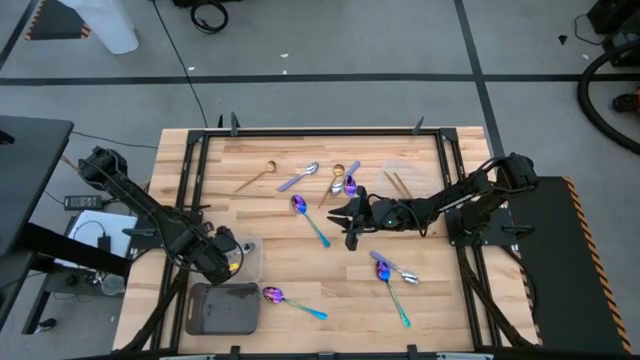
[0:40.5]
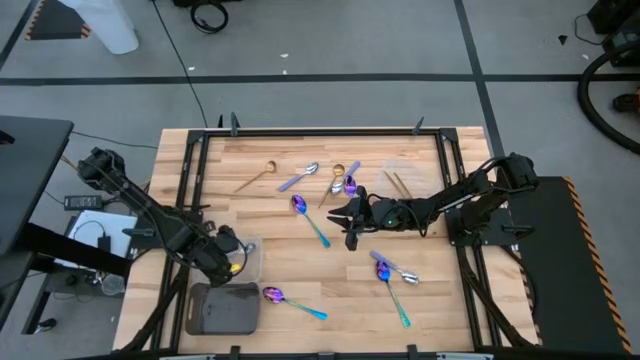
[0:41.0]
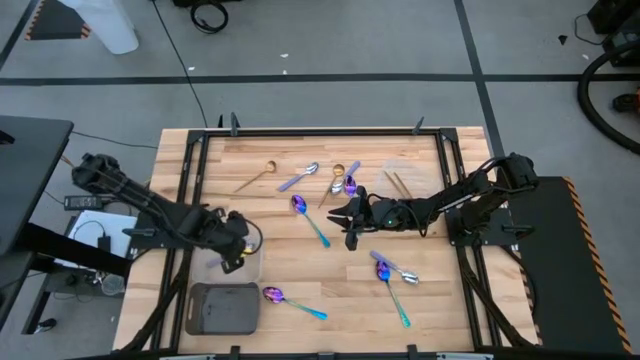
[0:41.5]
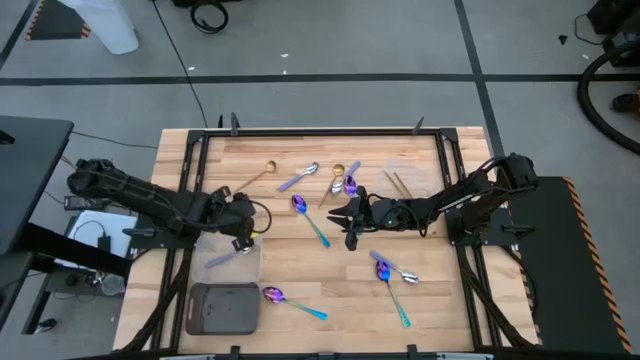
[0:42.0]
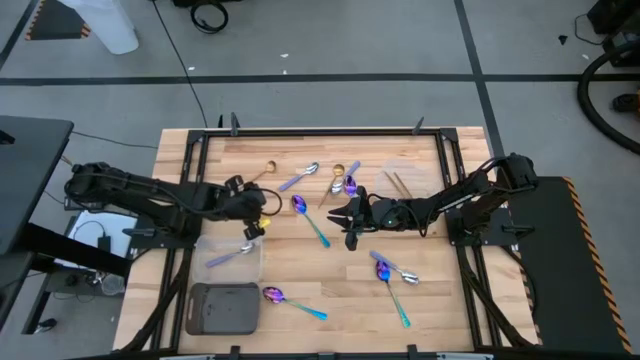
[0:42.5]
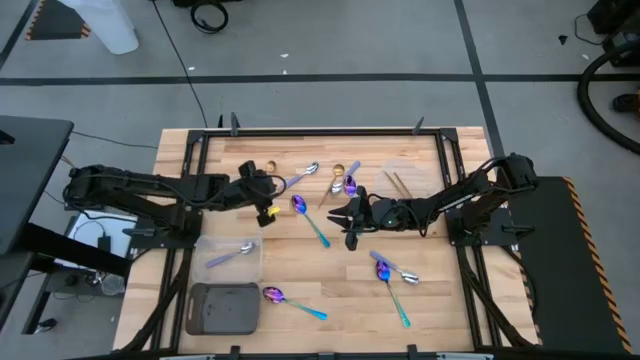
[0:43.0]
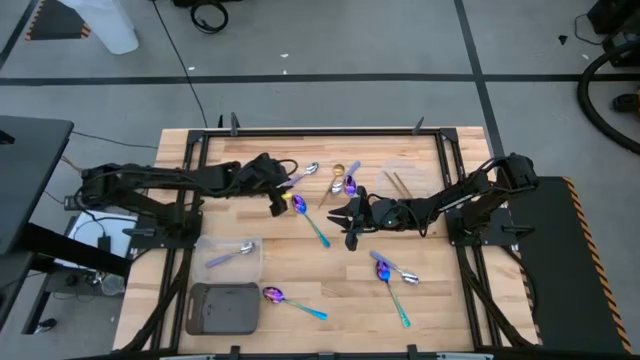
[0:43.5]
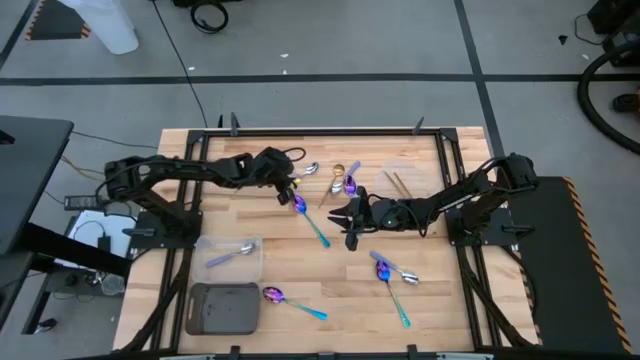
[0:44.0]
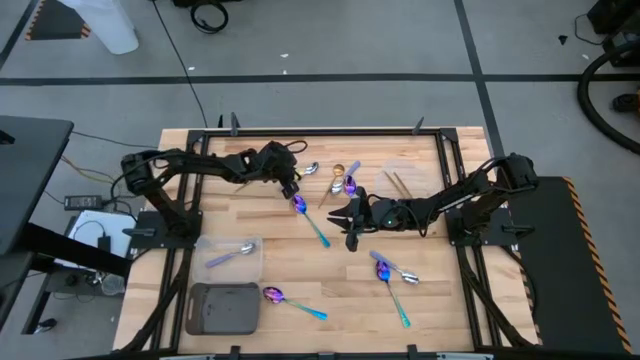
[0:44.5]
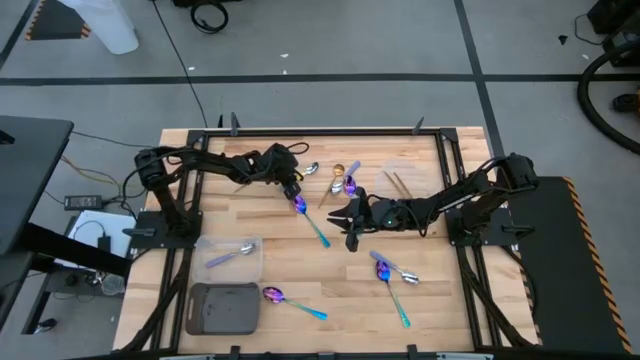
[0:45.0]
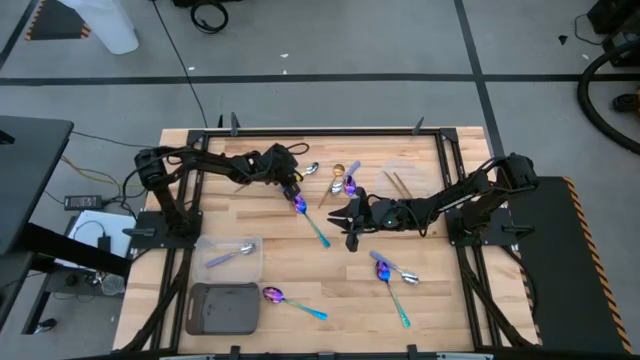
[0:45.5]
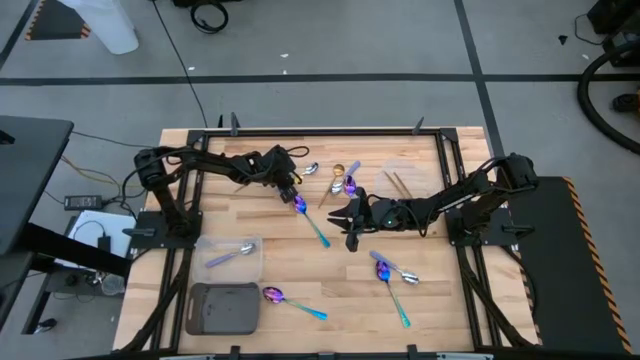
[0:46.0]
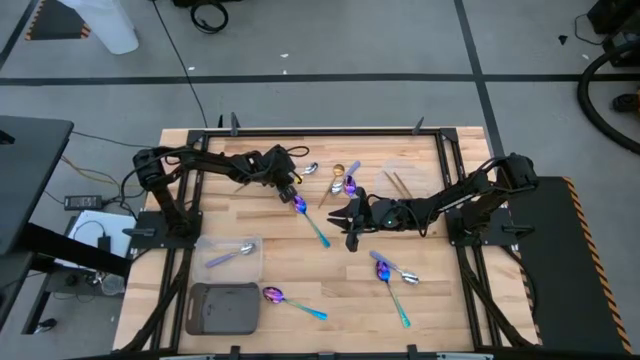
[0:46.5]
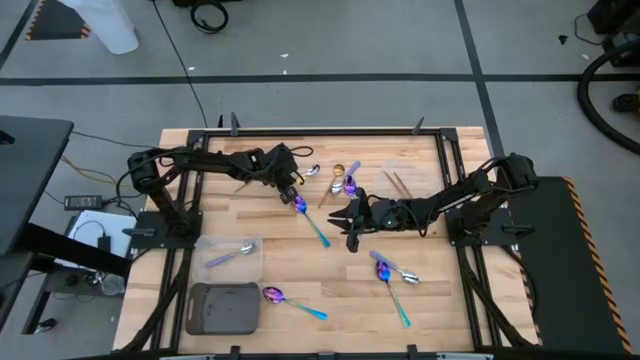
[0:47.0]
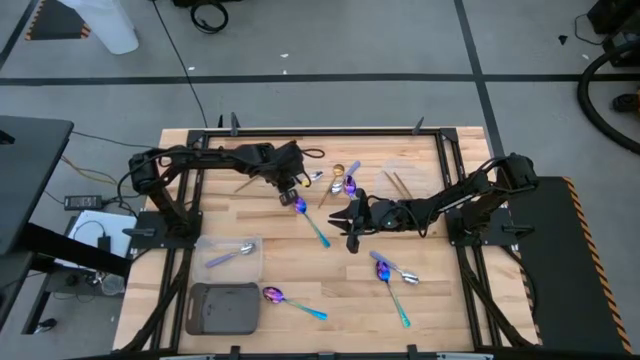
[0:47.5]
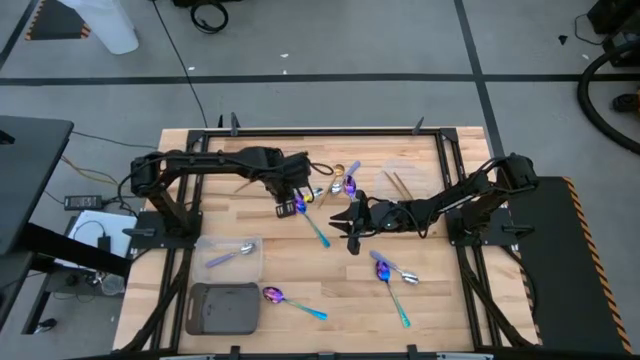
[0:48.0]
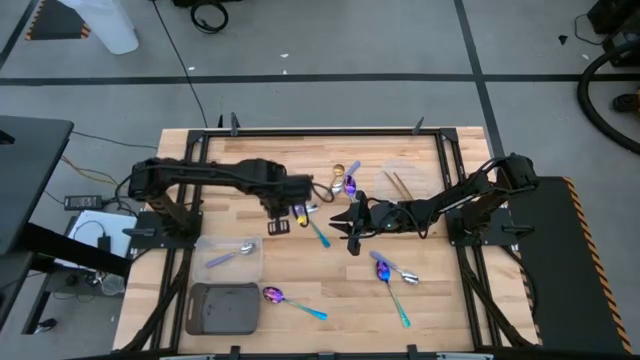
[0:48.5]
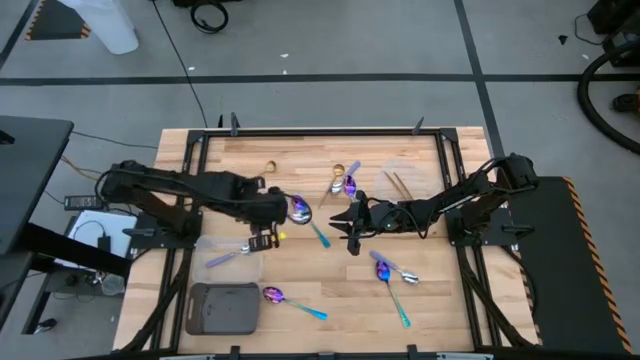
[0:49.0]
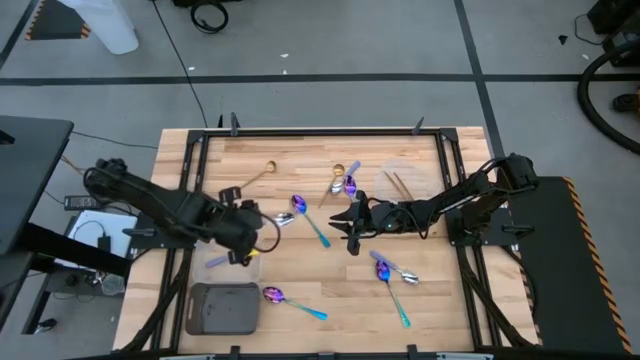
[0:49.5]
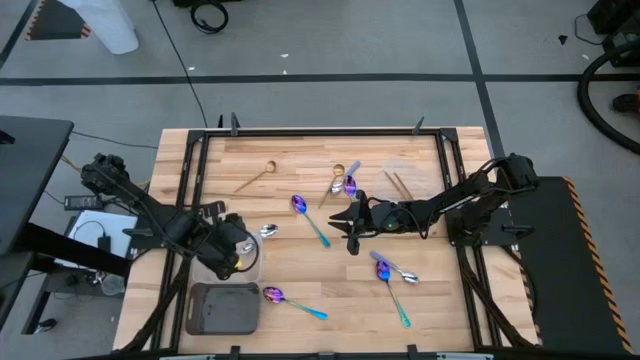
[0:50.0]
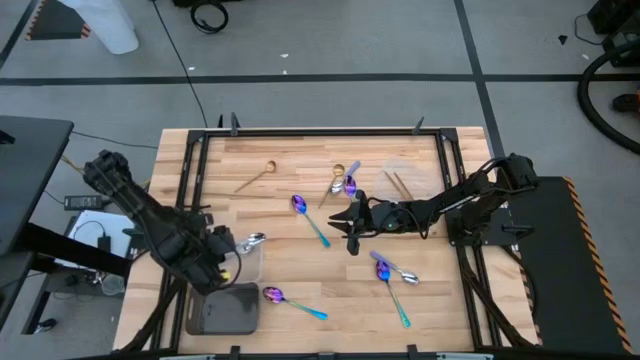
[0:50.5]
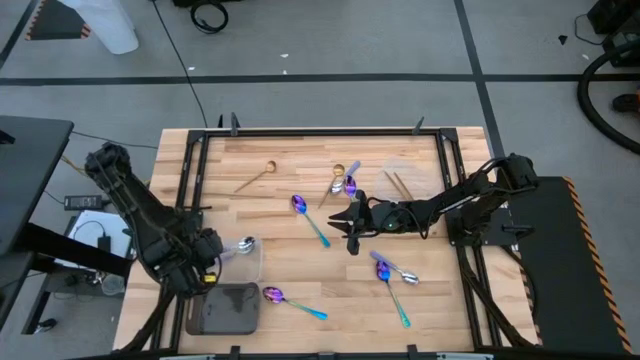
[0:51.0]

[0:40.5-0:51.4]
Task: Sort silverware by color (type)
Put the purple spoon into the bottom transparent bin

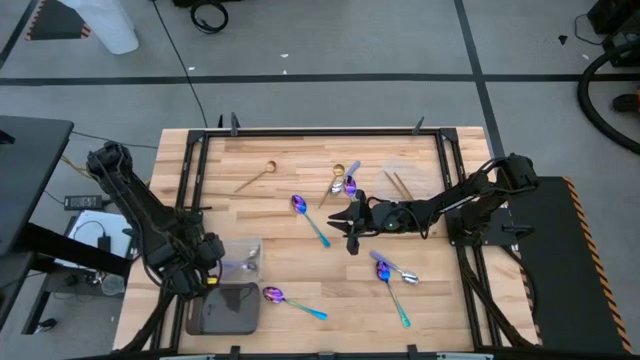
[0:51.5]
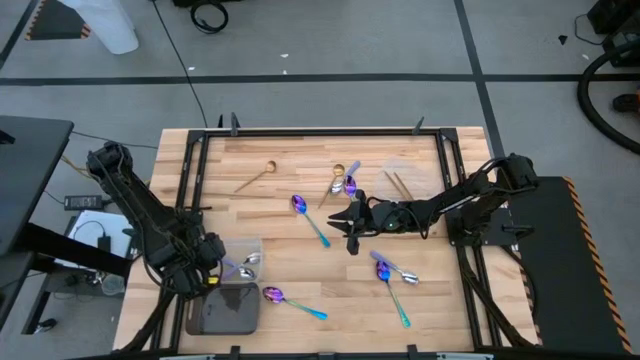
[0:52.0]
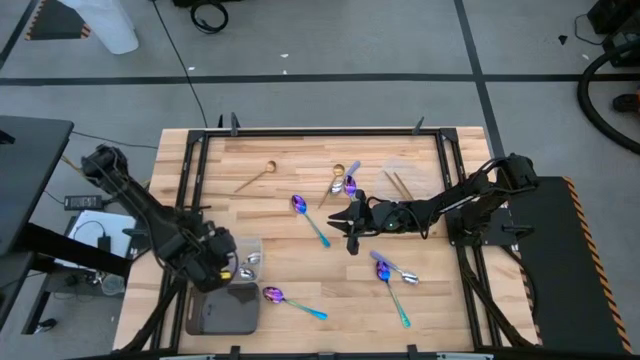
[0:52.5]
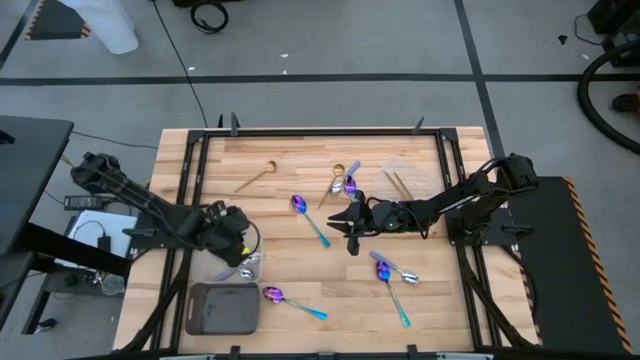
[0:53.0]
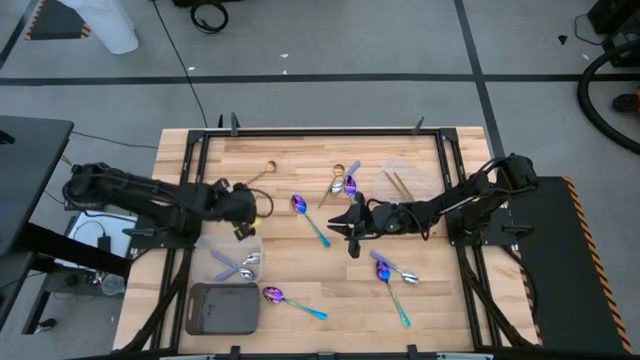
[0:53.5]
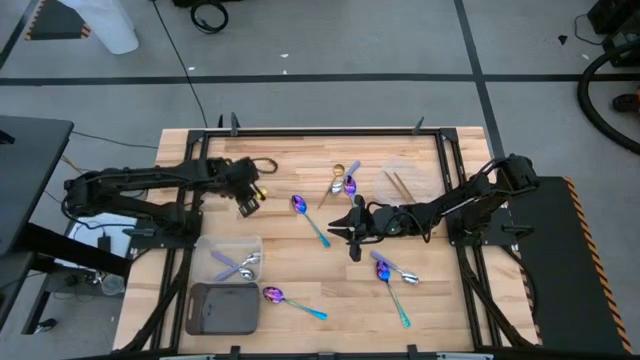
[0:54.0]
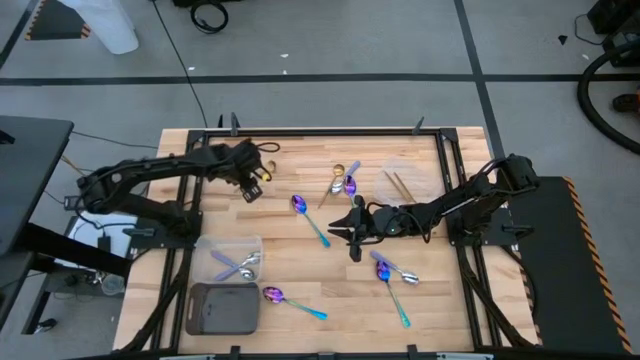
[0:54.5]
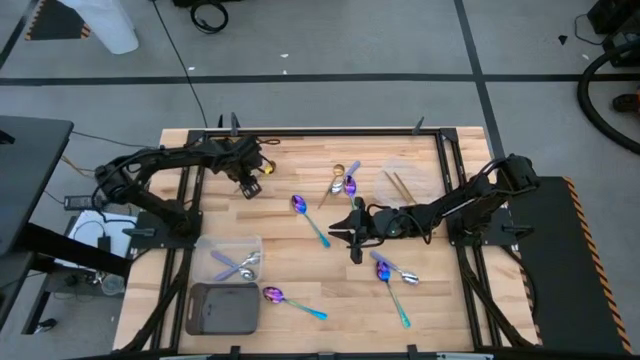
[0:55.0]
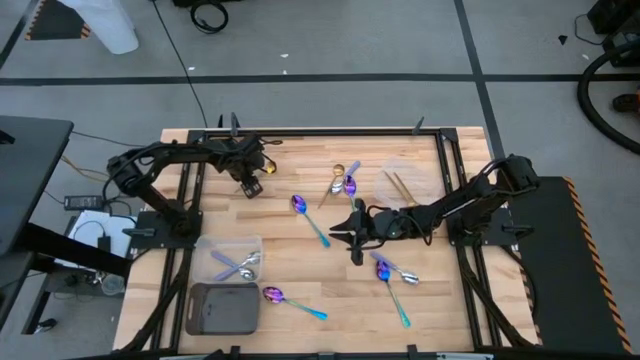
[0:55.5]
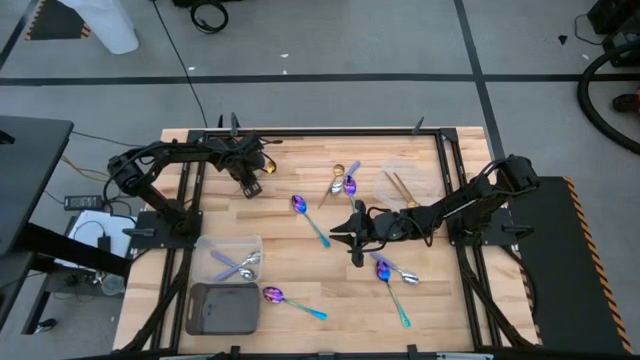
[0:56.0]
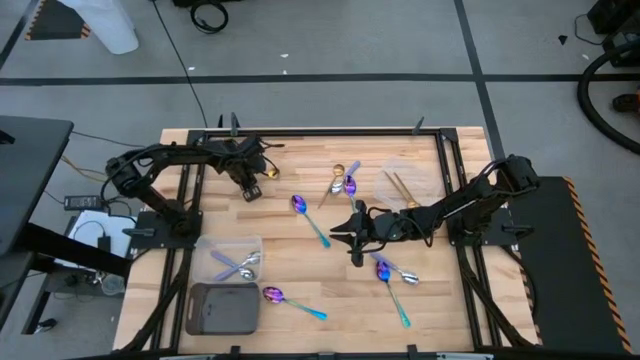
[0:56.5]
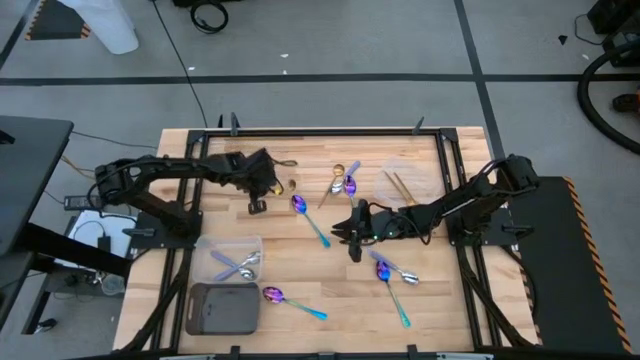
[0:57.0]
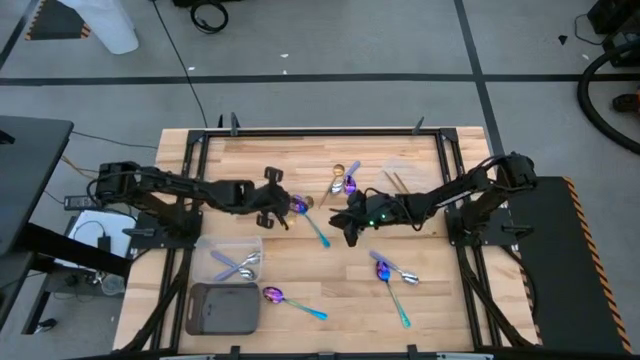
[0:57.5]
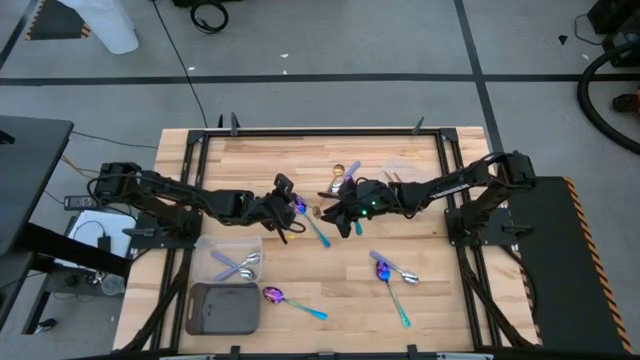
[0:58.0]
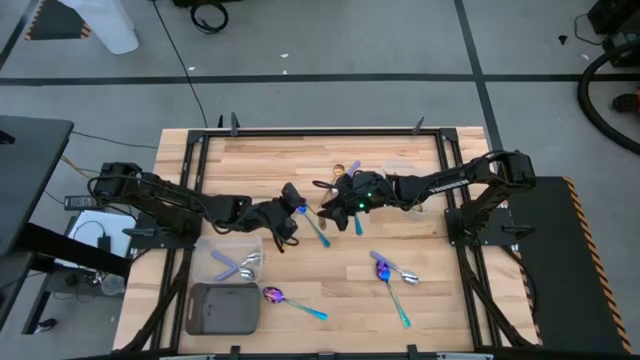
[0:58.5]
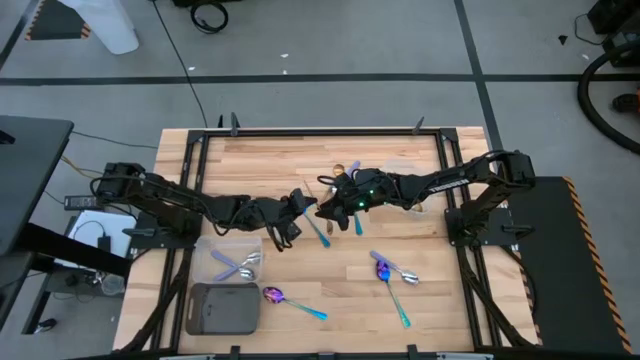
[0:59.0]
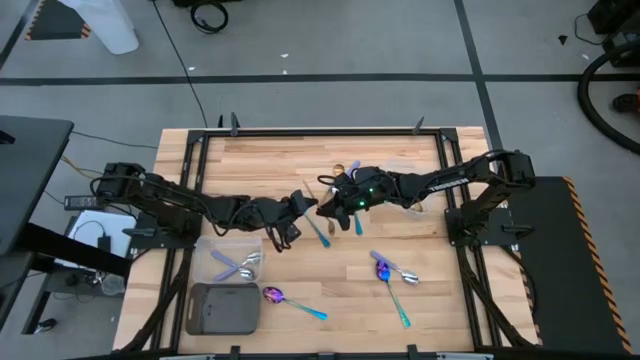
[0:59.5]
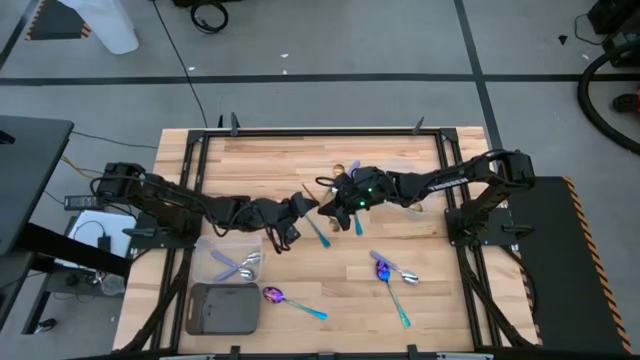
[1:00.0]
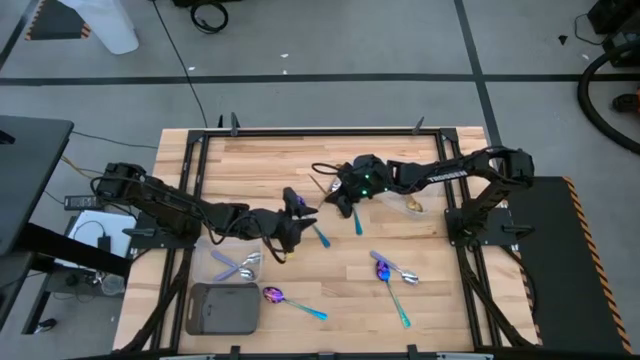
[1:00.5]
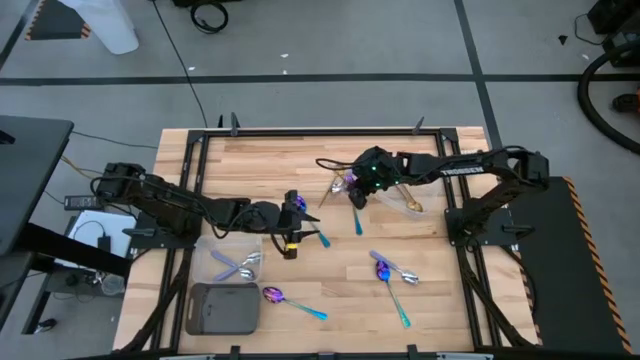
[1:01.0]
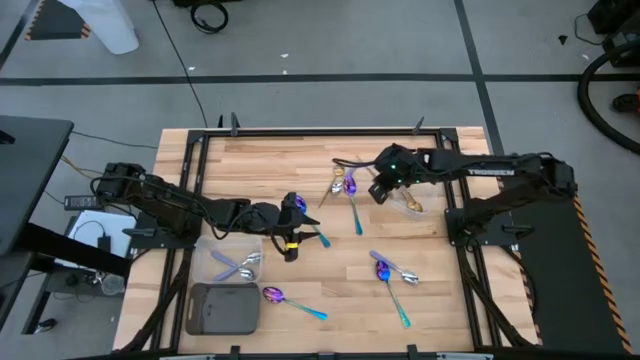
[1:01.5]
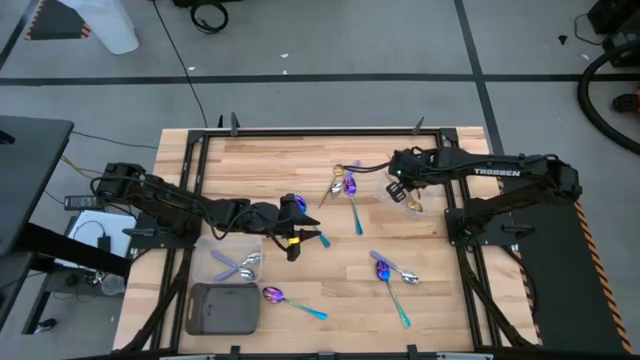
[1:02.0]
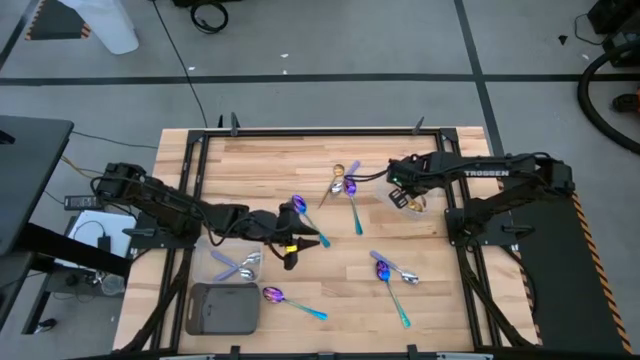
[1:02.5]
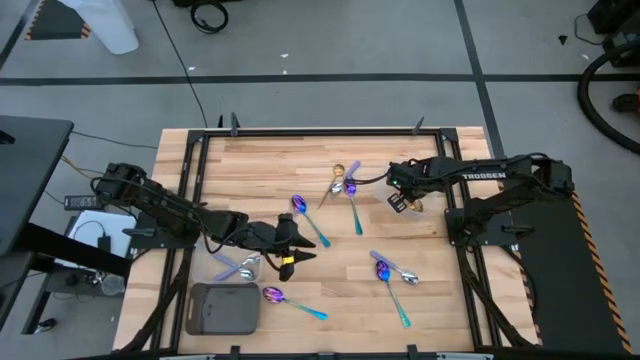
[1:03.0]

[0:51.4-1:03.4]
Put the spoon into the top transparent bin
